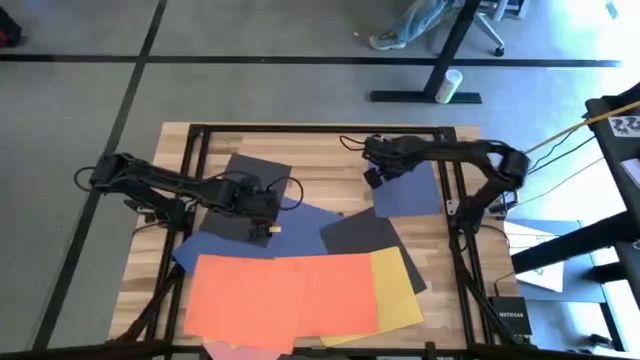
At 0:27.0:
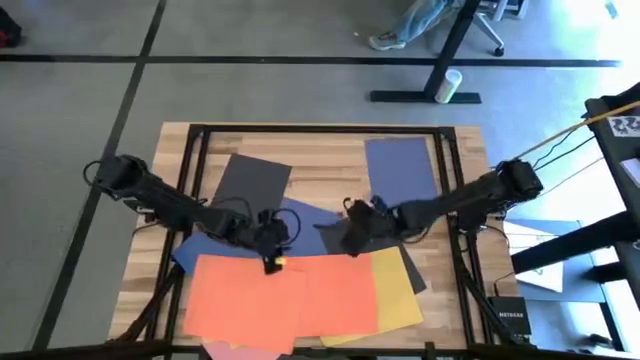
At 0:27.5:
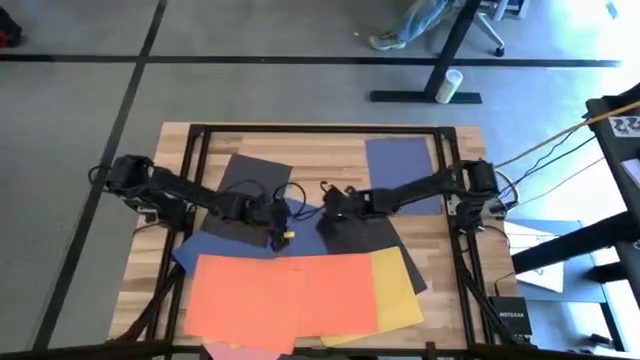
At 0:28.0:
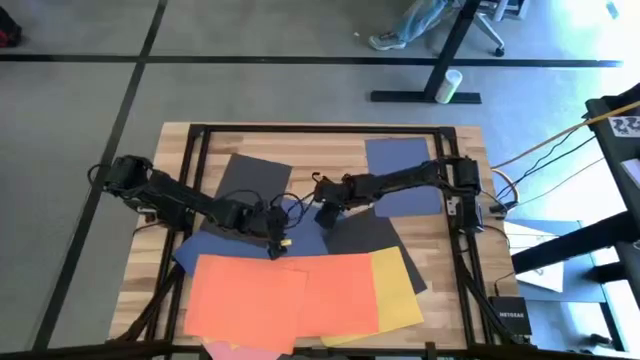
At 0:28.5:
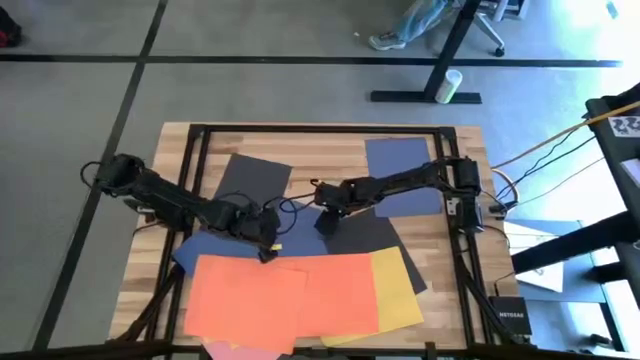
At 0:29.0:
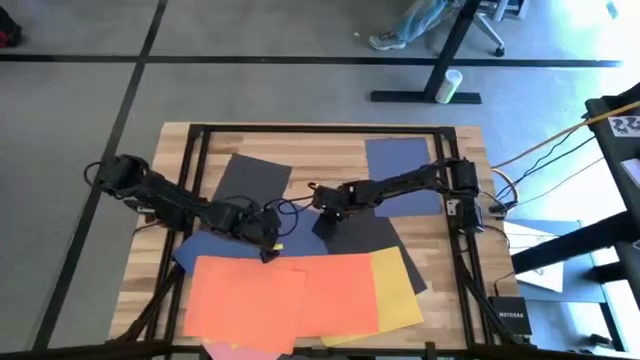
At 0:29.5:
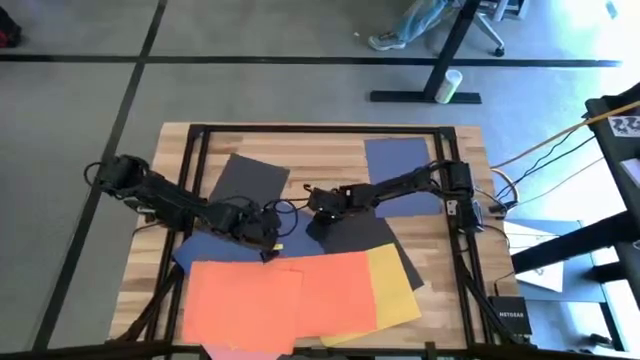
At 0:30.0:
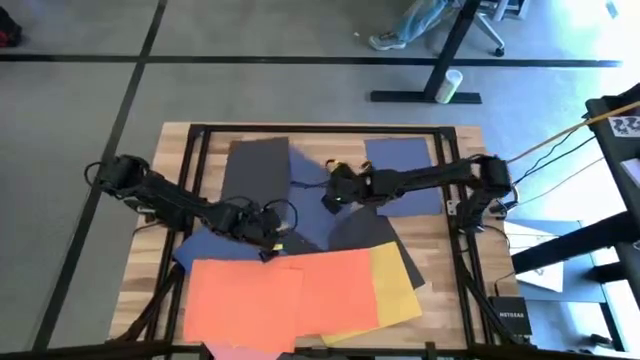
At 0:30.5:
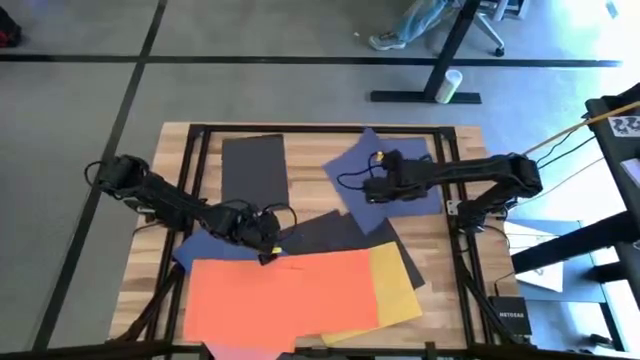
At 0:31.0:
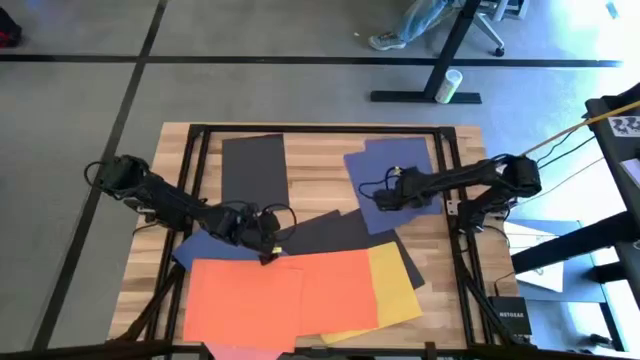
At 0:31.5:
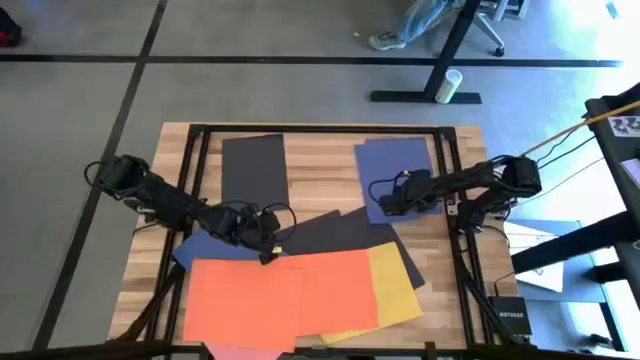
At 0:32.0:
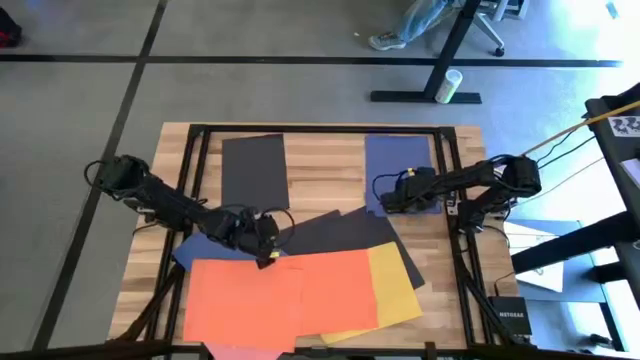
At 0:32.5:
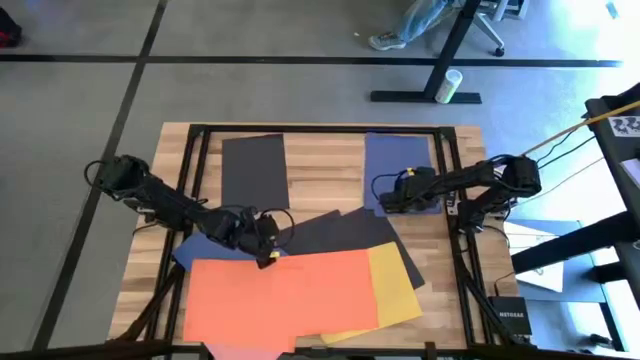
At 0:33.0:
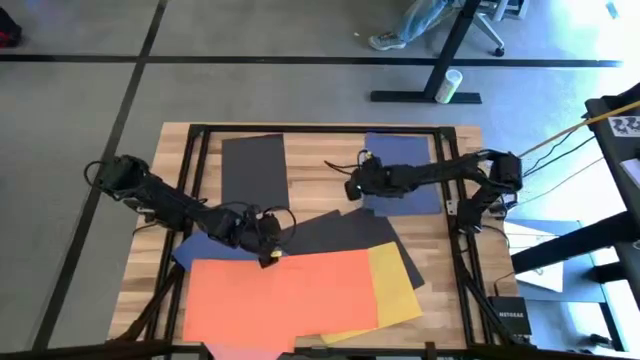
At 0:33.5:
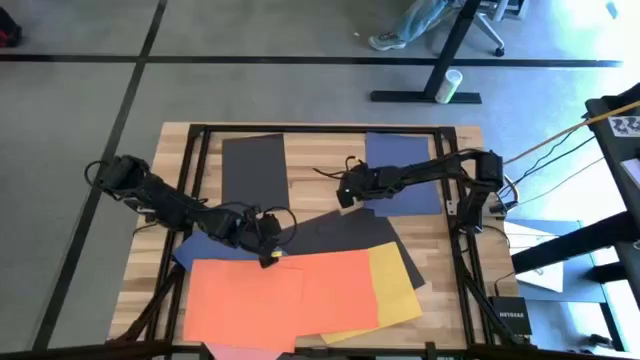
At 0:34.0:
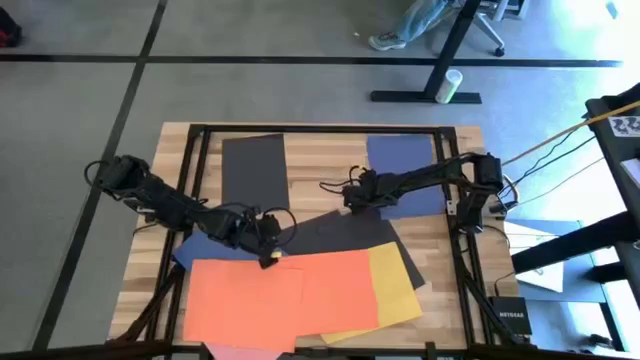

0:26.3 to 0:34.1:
Task: Organize paper
Stack the blue paper on top of the other blue paper

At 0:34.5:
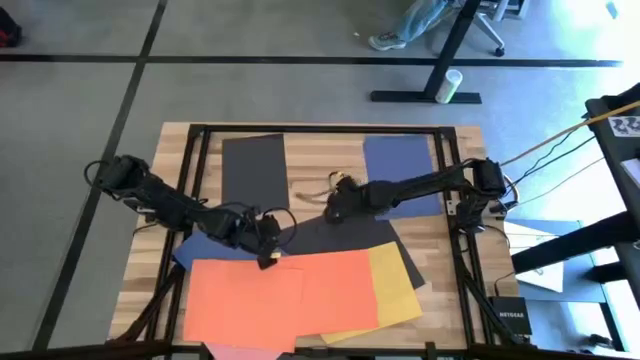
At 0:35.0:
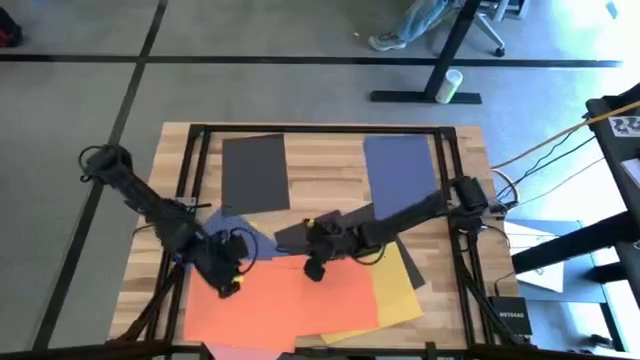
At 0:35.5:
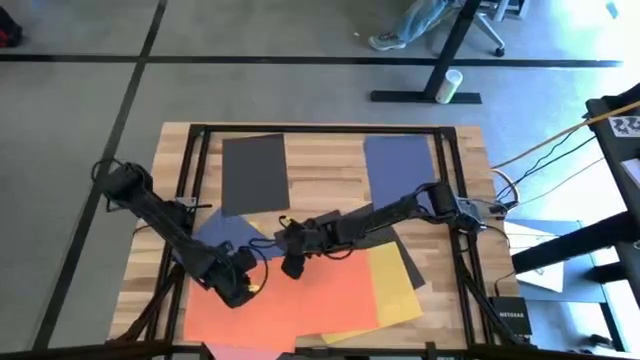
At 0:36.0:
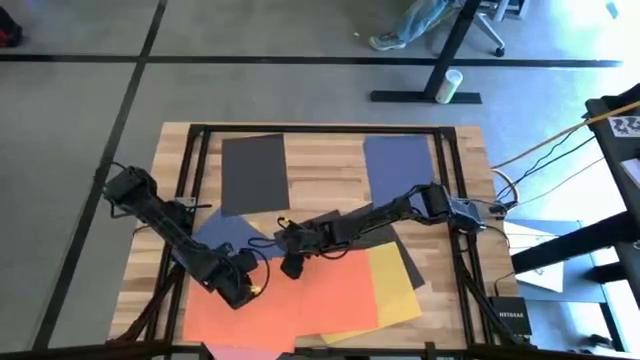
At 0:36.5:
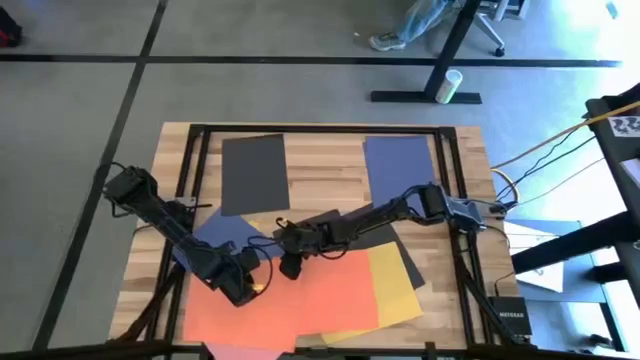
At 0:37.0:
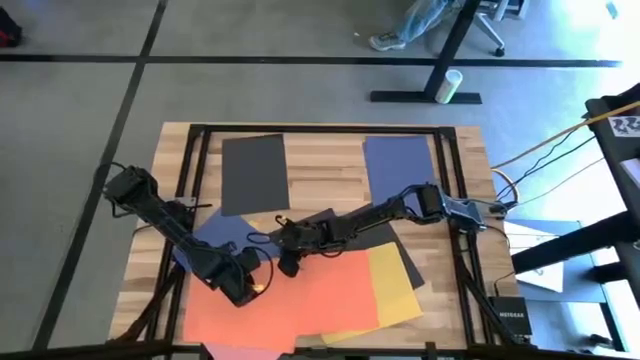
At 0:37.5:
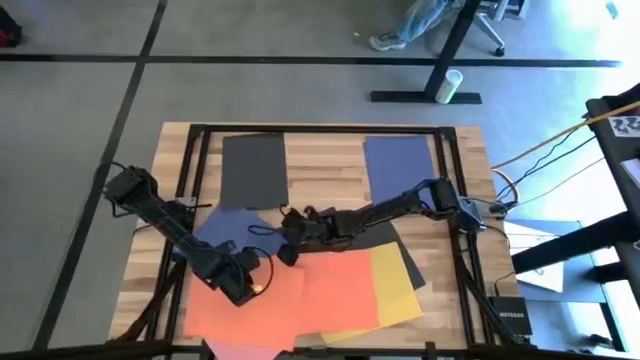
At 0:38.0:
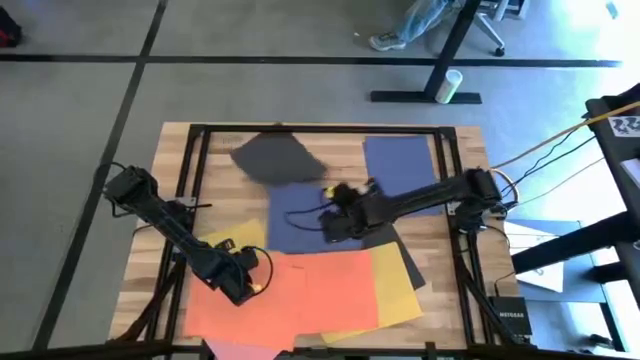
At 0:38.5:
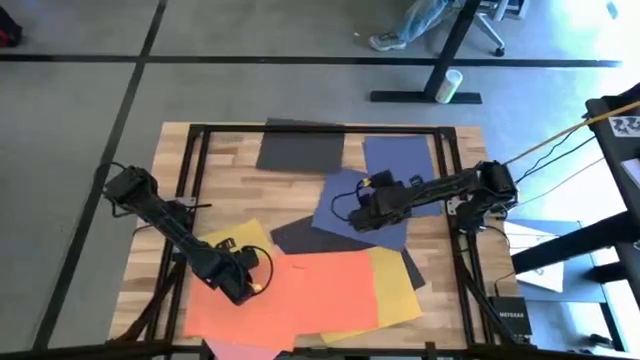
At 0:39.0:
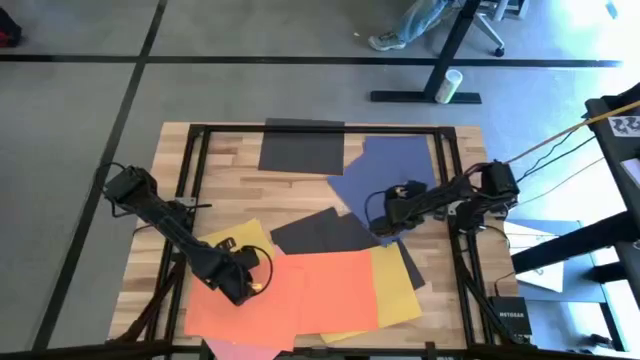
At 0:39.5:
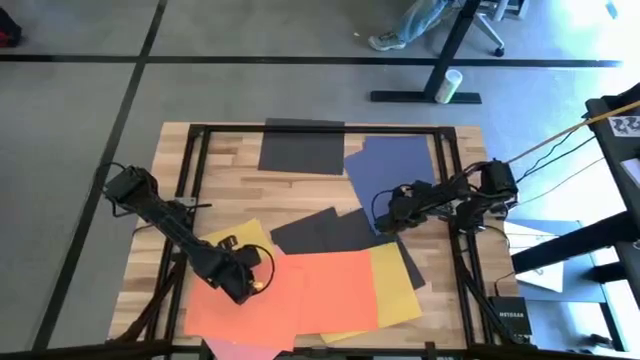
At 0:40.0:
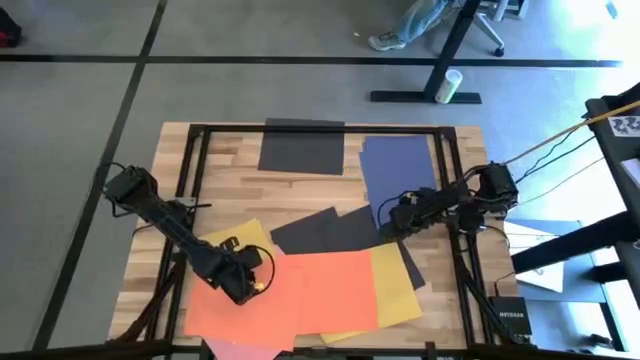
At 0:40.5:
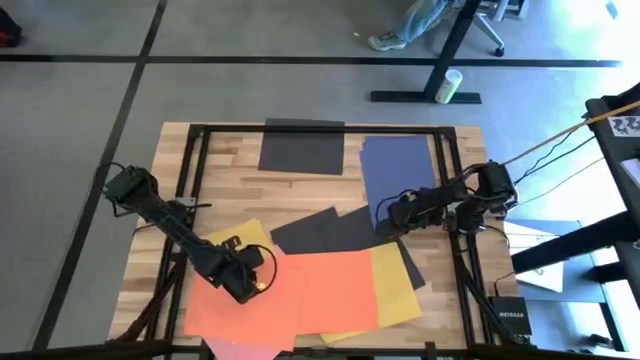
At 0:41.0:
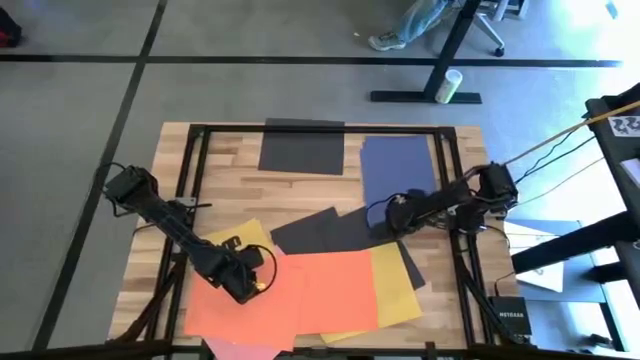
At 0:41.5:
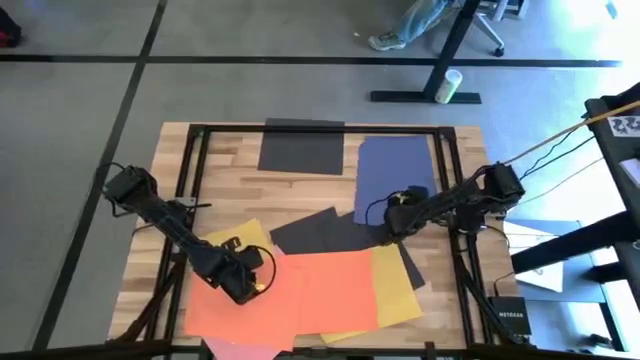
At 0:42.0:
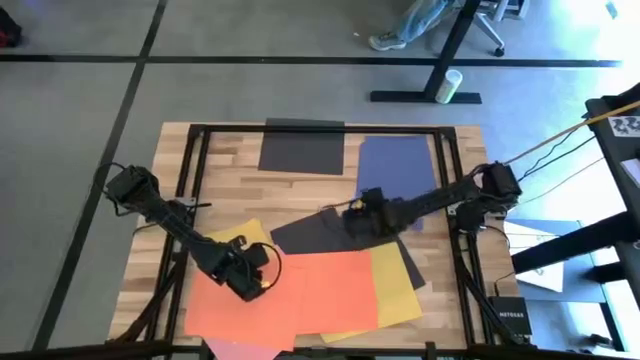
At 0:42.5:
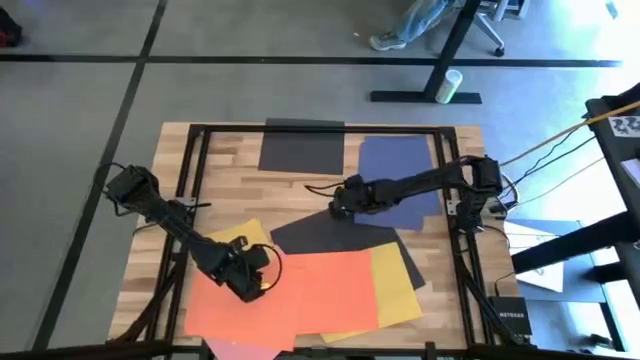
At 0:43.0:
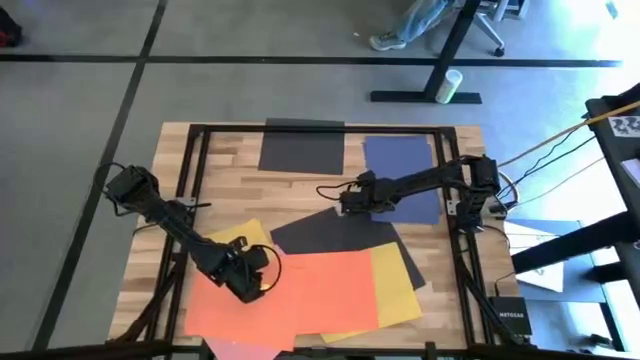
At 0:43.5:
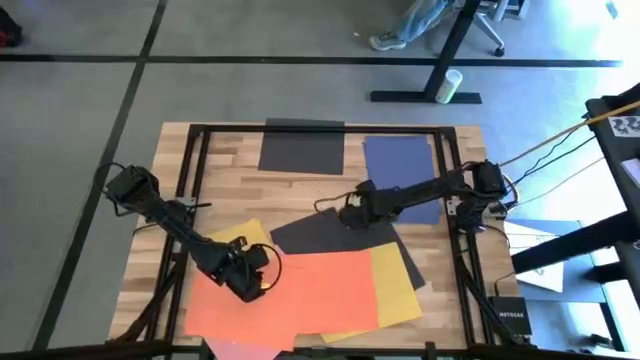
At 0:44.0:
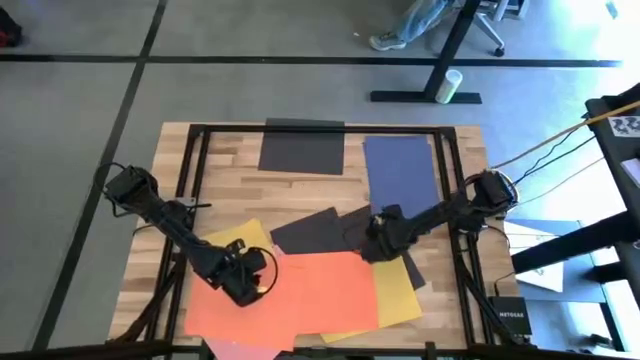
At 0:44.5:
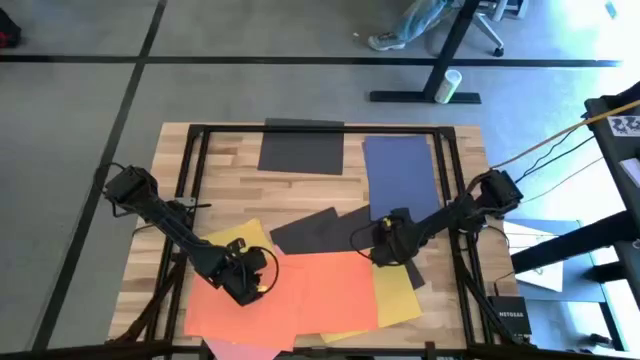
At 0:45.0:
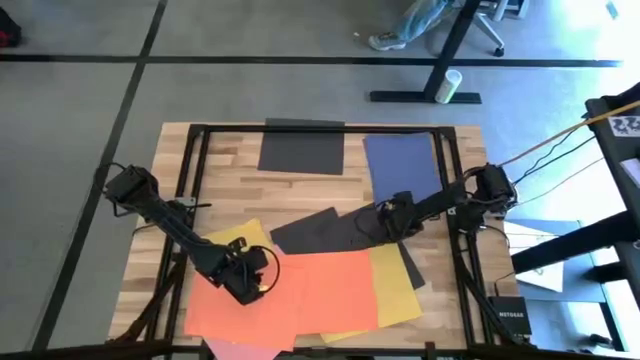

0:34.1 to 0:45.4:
Stack the blue paper on top of the other blue paper
